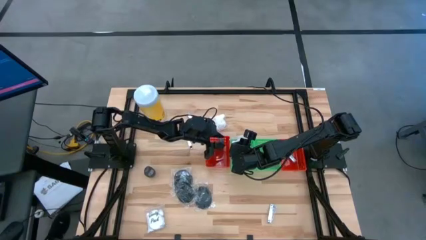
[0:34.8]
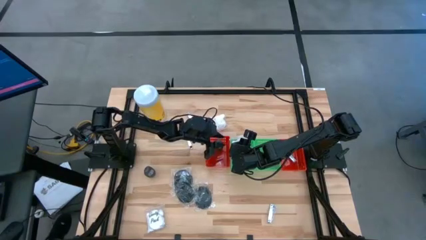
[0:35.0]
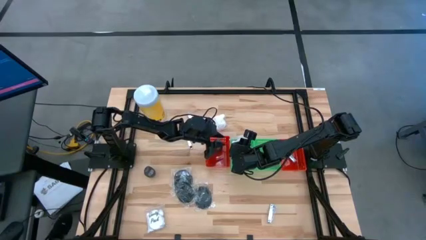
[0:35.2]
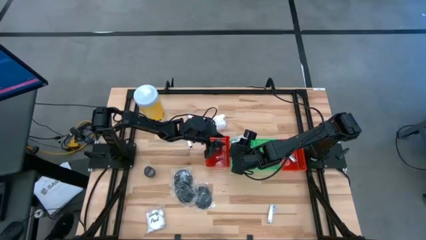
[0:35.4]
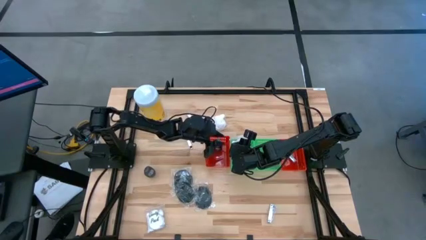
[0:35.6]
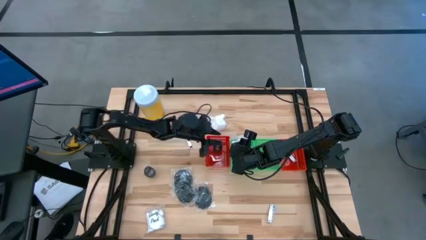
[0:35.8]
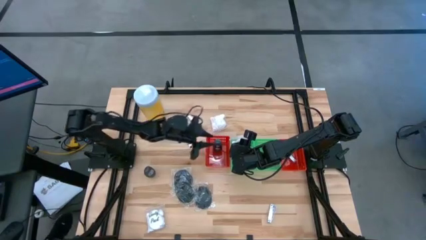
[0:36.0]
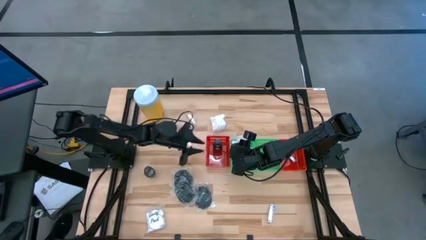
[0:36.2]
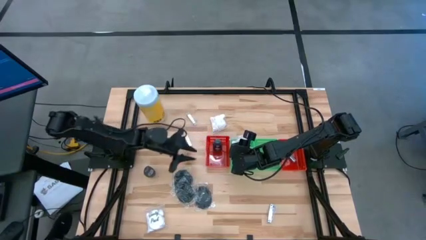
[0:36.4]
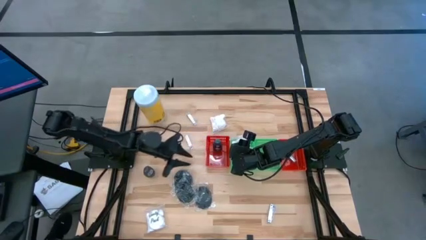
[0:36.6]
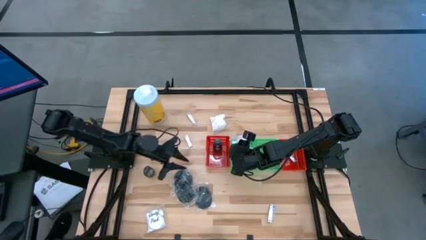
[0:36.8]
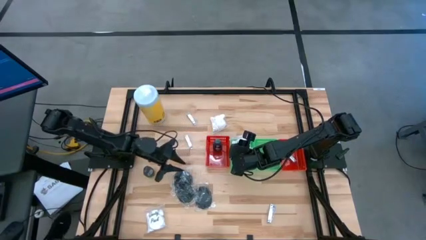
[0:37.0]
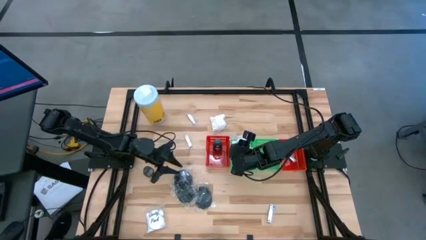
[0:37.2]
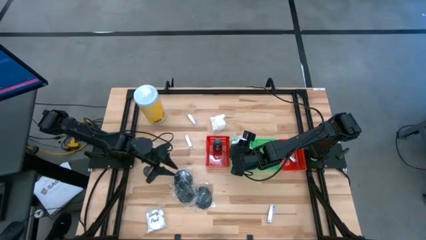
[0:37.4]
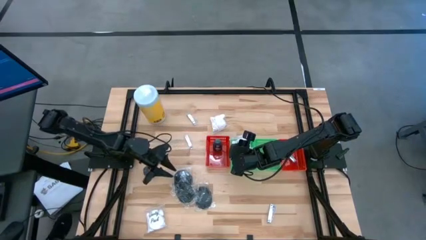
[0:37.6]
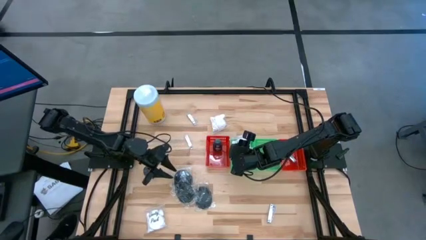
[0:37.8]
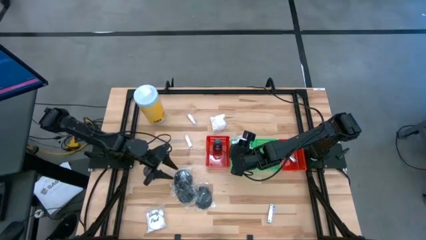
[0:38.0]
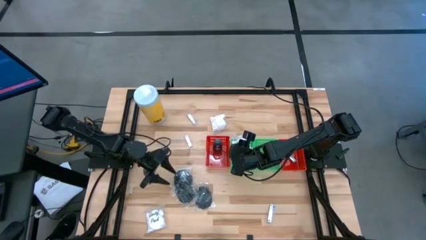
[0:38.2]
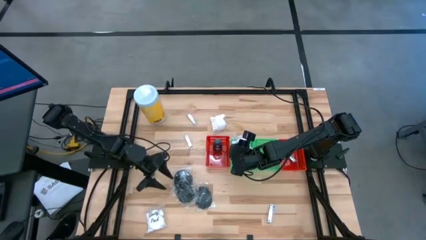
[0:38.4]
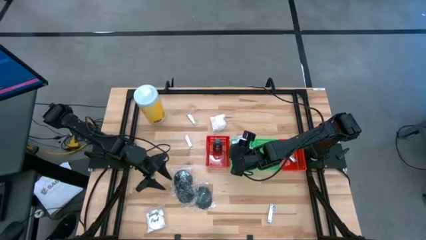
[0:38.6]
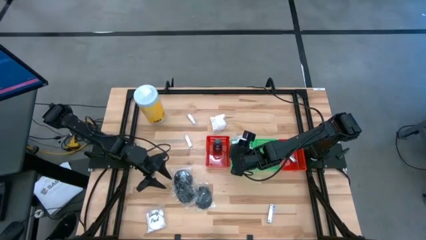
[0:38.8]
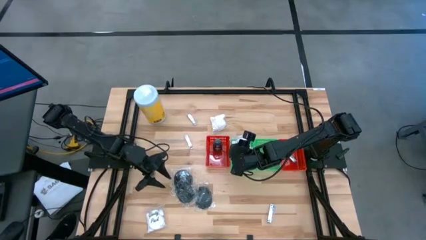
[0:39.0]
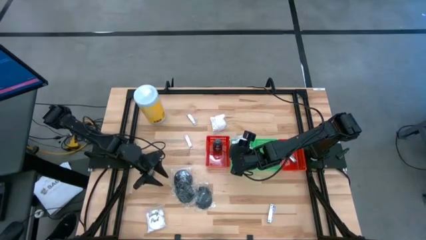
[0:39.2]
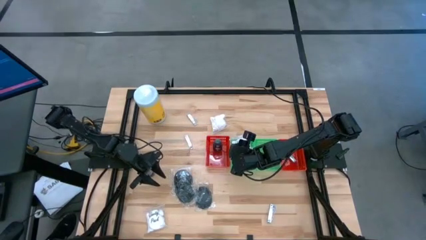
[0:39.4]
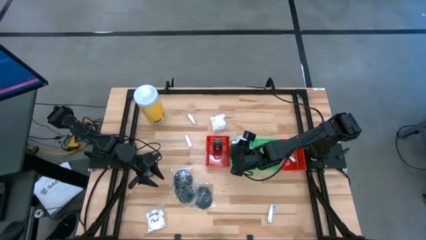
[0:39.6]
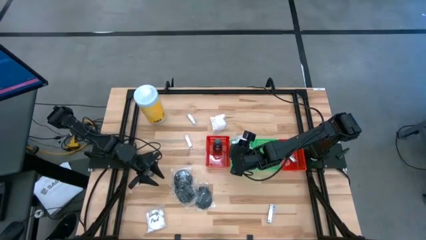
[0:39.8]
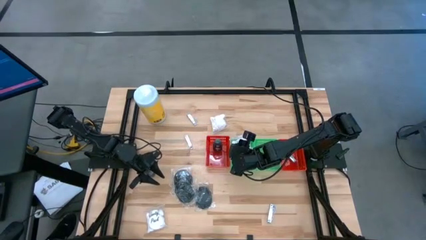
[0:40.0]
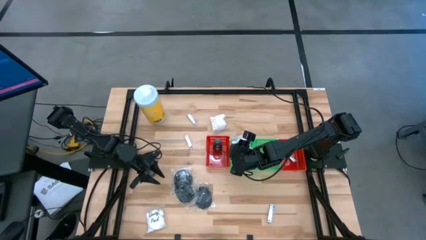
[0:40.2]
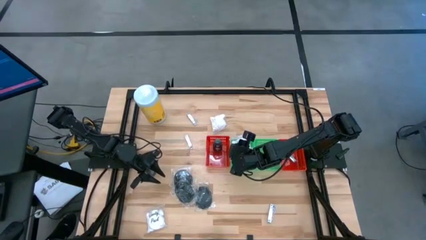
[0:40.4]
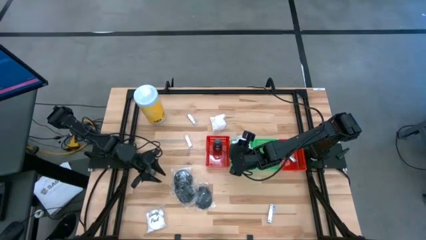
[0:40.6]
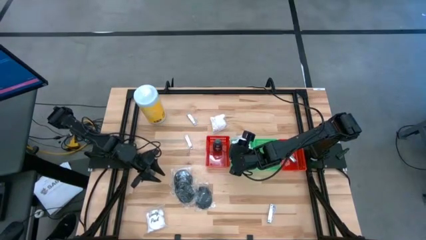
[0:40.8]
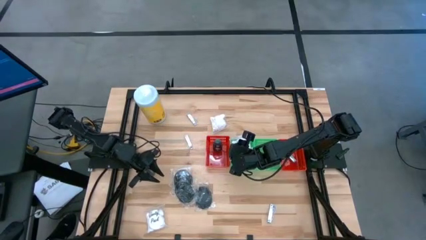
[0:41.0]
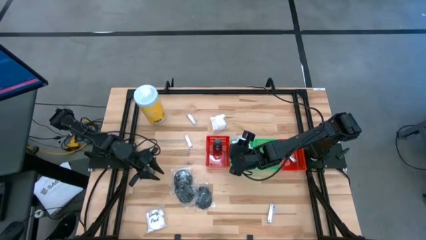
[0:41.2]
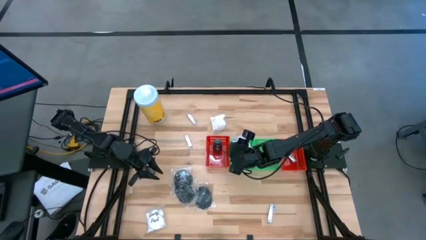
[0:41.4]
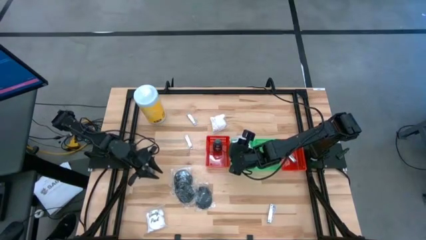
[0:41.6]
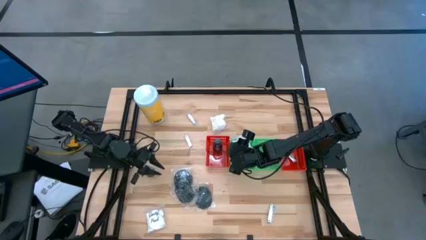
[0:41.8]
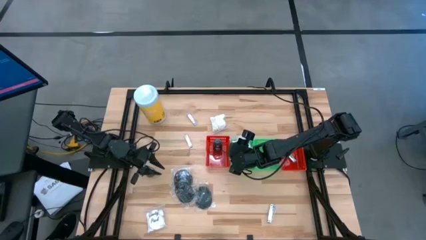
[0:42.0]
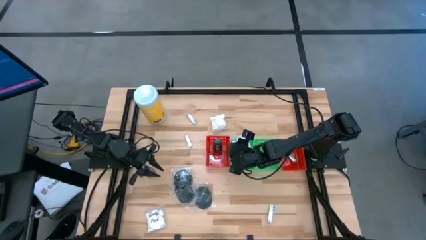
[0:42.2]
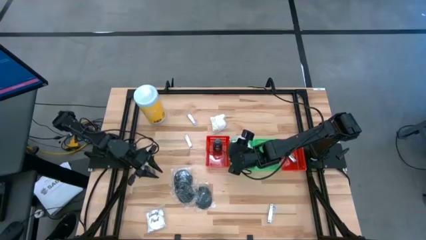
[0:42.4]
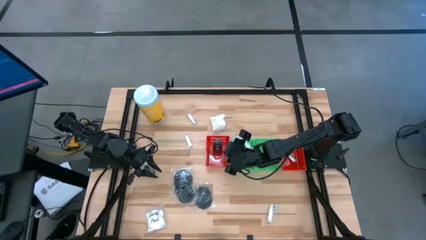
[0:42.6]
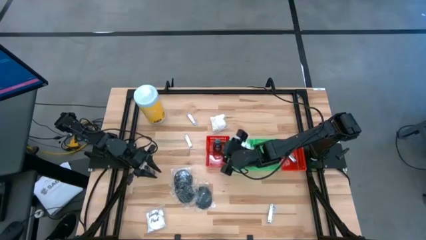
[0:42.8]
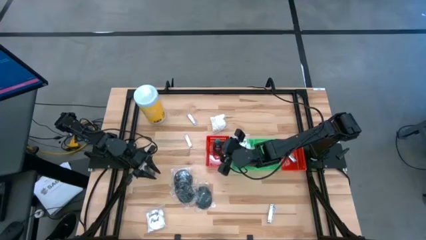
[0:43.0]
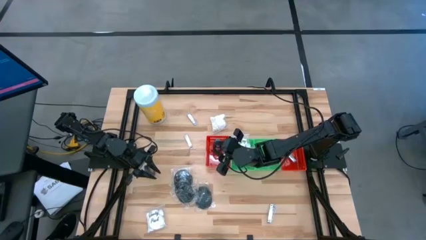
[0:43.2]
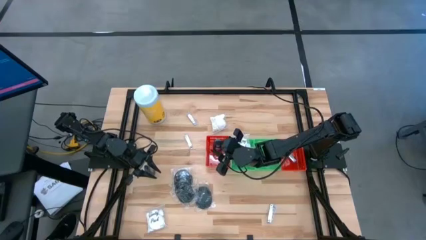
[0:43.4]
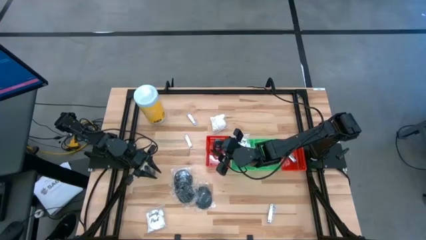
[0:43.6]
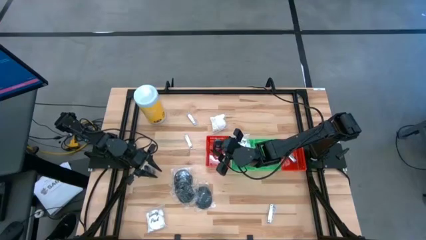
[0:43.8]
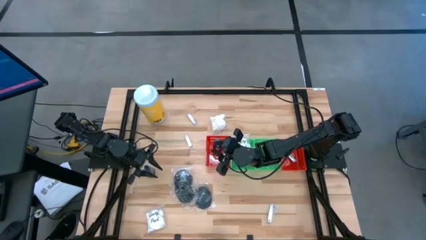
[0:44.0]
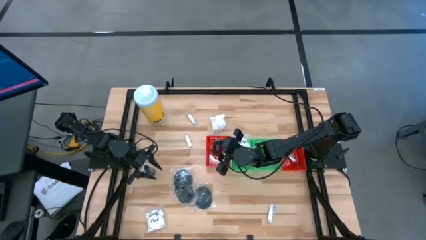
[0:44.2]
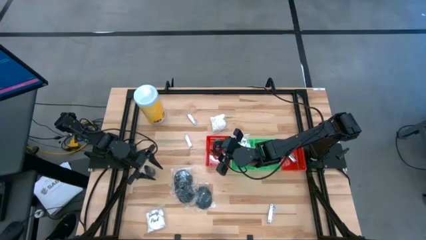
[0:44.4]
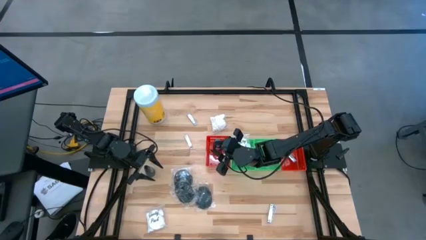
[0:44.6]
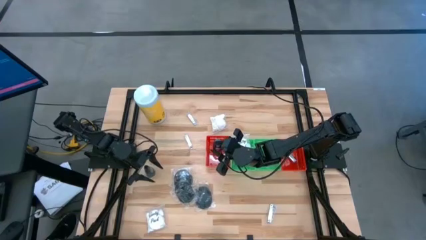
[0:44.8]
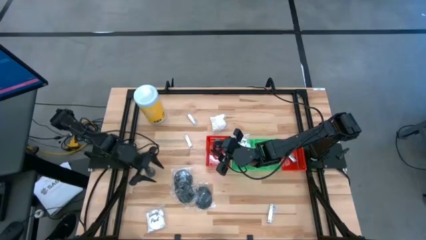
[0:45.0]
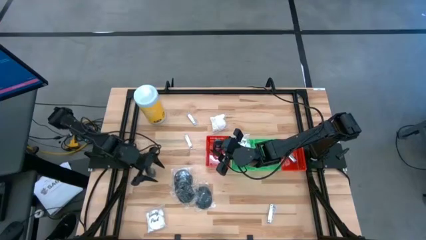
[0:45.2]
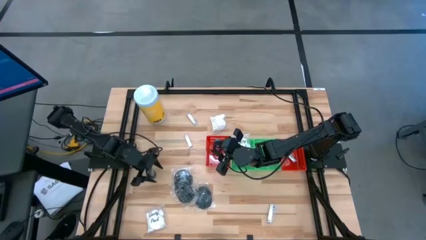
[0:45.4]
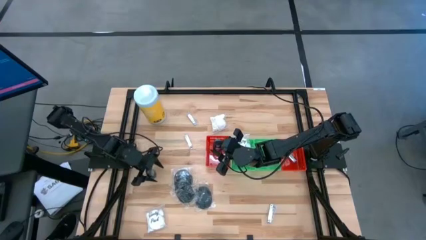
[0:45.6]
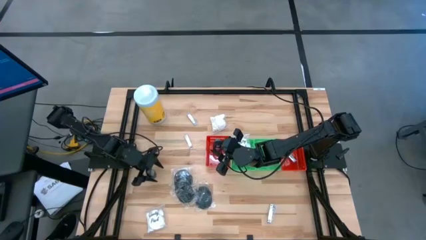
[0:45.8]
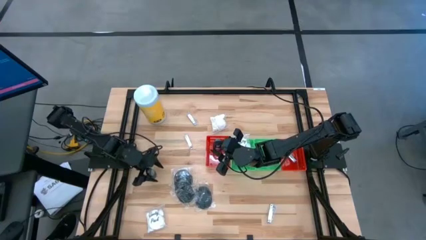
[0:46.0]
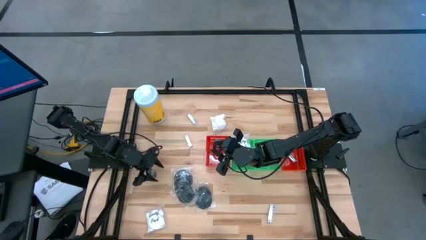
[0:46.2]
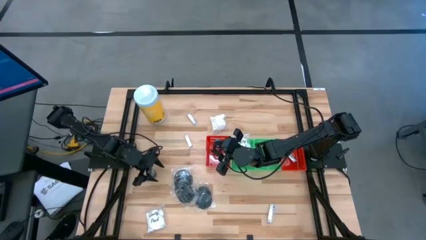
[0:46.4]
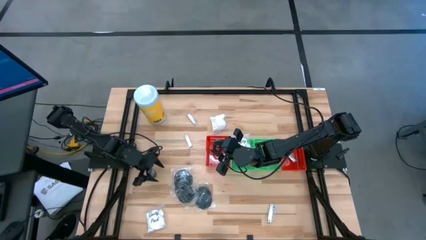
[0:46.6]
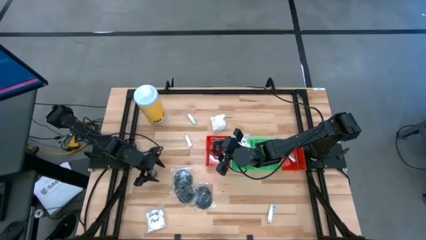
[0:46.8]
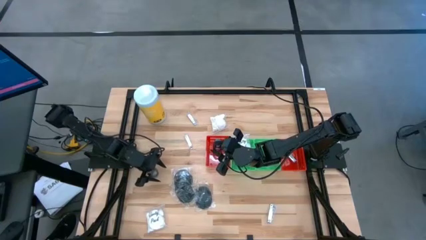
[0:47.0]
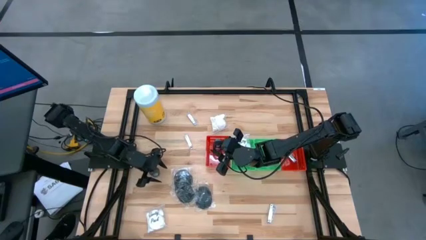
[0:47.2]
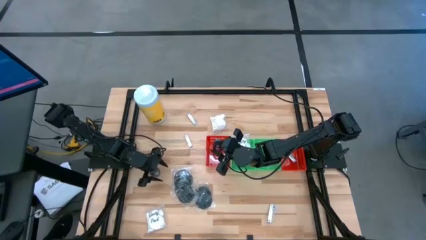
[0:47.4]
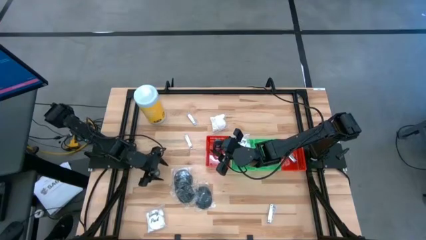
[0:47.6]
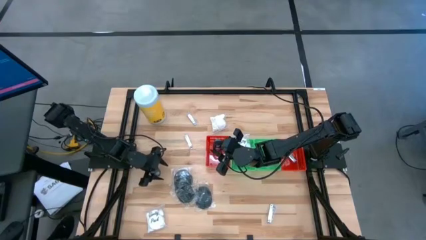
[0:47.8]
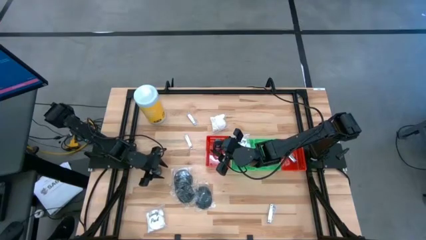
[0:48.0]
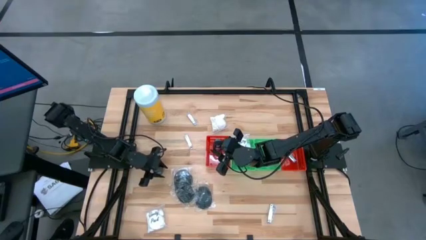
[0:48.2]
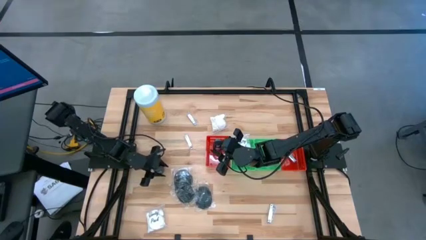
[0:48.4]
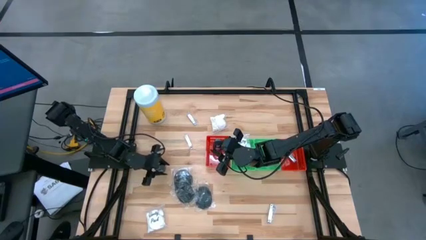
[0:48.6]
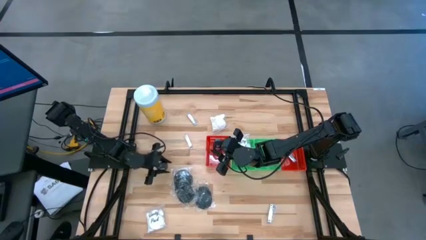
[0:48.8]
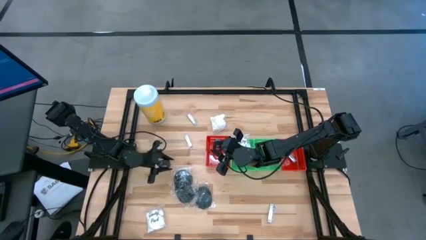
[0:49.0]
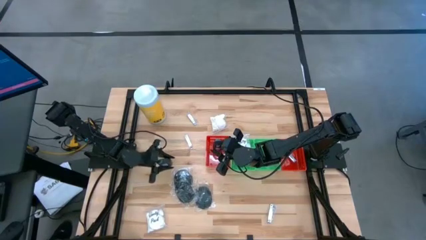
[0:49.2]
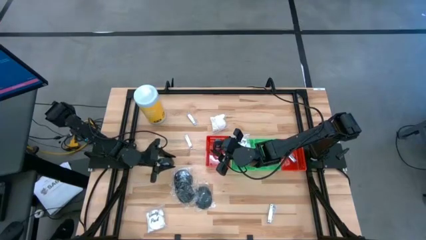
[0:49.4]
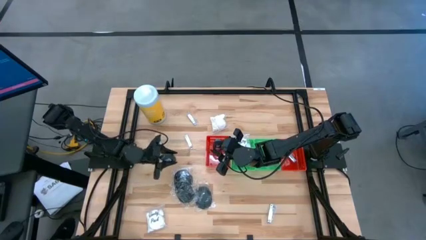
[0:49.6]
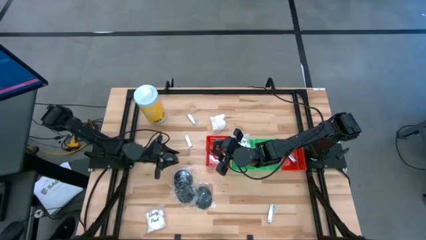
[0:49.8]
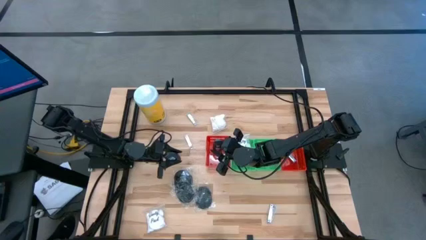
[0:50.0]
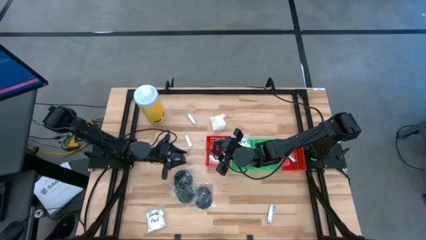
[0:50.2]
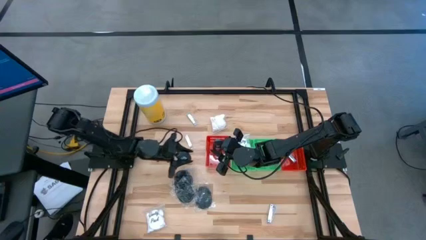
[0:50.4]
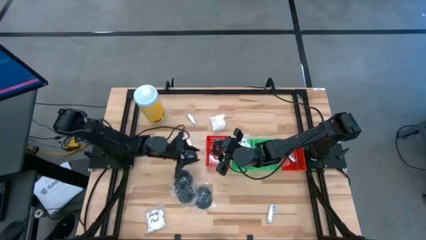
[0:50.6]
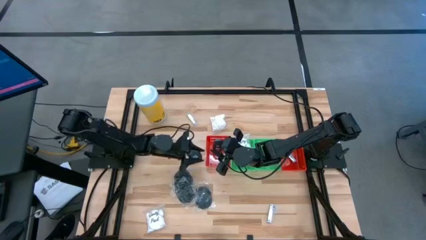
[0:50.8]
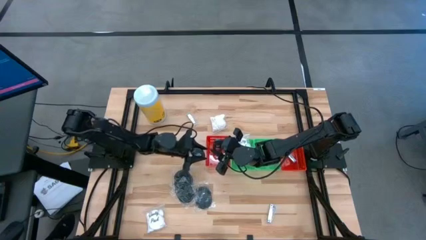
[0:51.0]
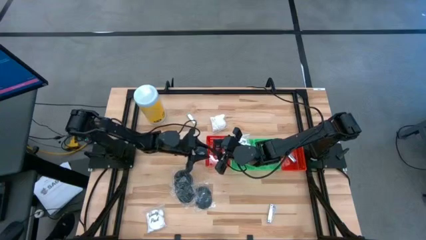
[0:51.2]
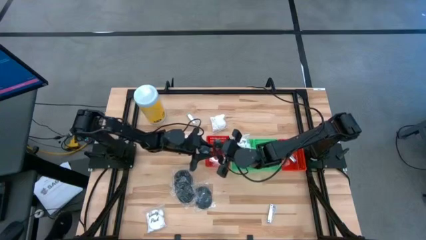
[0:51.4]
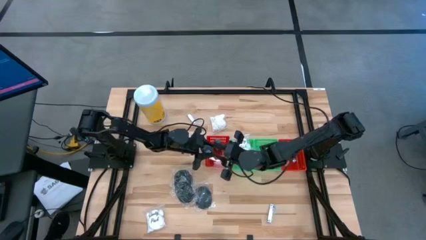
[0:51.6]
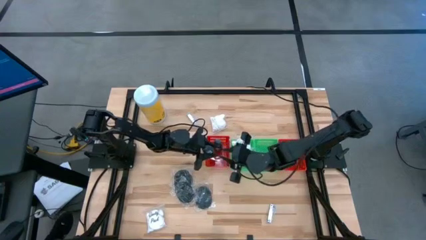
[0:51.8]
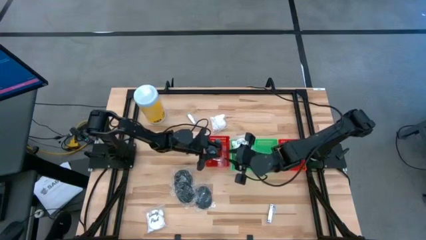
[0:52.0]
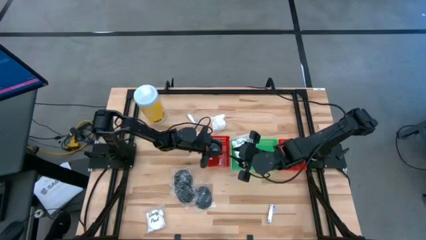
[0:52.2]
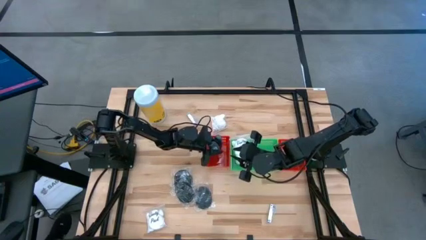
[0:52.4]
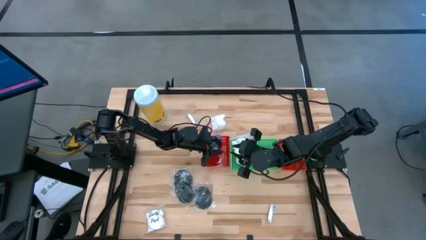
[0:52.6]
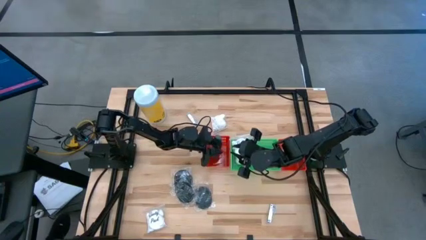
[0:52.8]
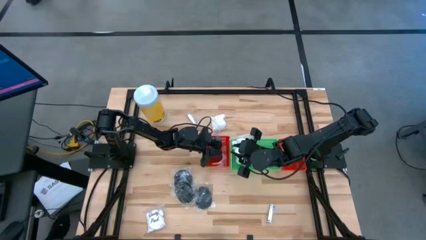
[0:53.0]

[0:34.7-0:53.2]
Task: Pick & Place Travel size toiletries
Put the black deodorant into the left red bin
